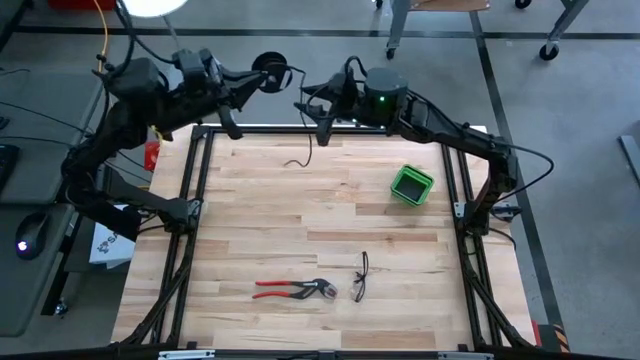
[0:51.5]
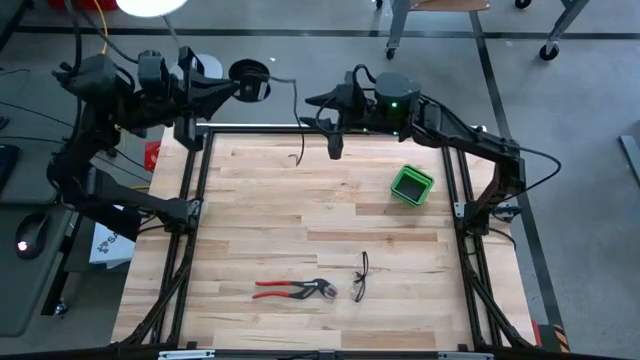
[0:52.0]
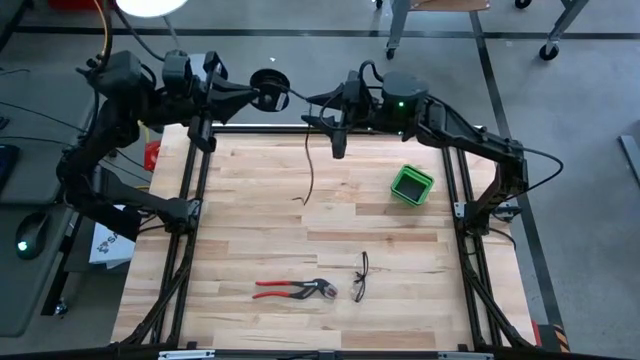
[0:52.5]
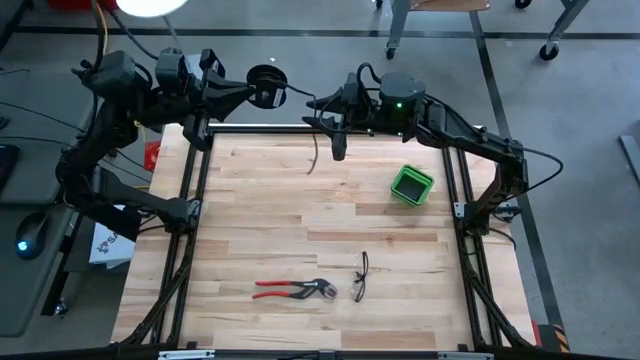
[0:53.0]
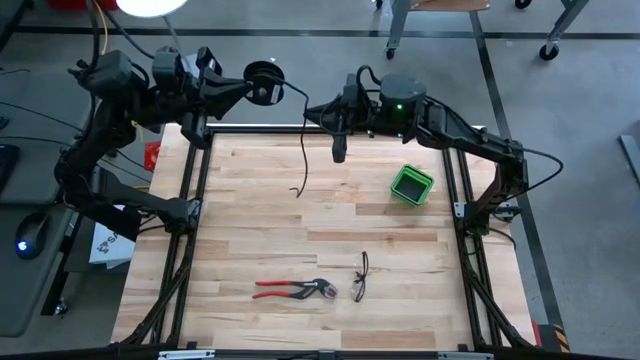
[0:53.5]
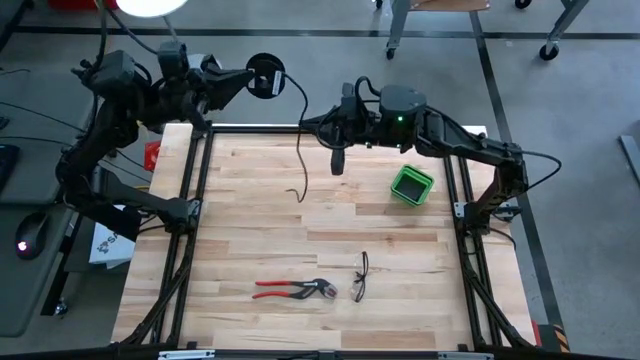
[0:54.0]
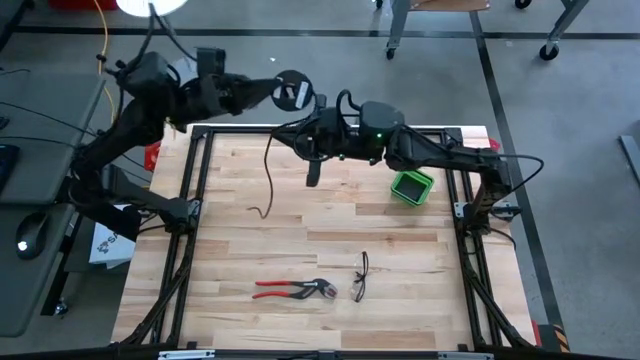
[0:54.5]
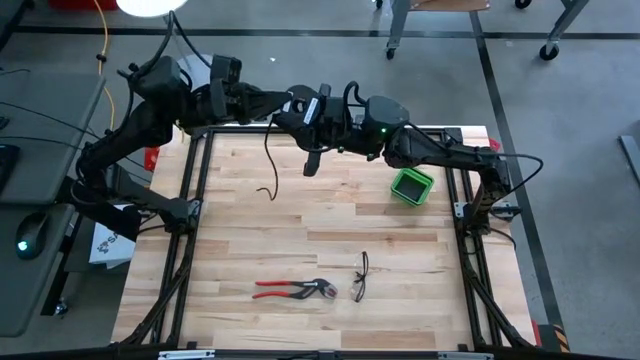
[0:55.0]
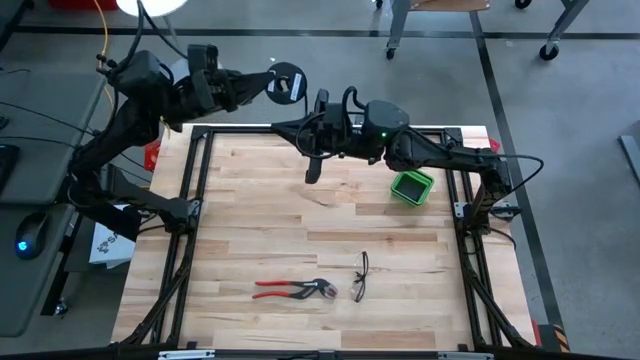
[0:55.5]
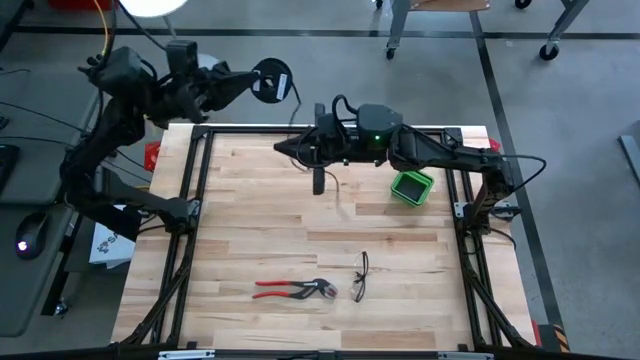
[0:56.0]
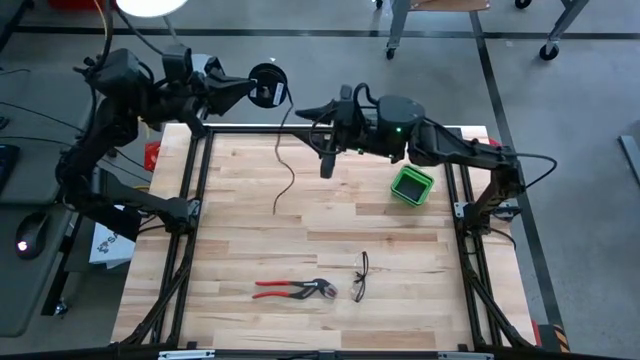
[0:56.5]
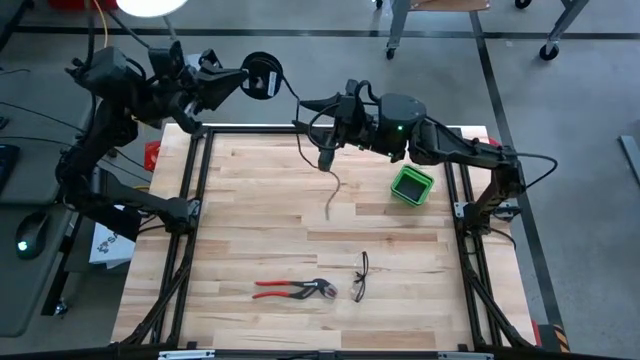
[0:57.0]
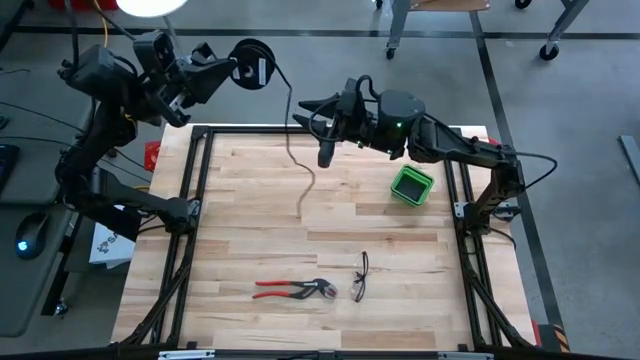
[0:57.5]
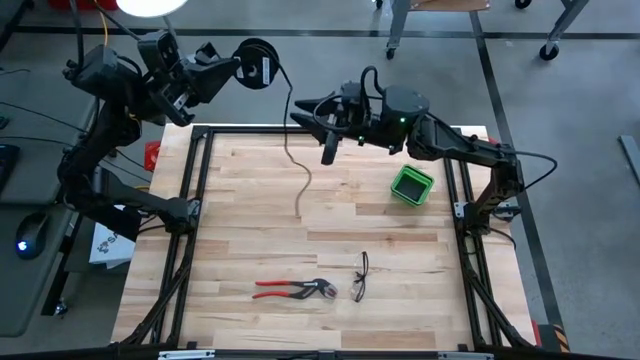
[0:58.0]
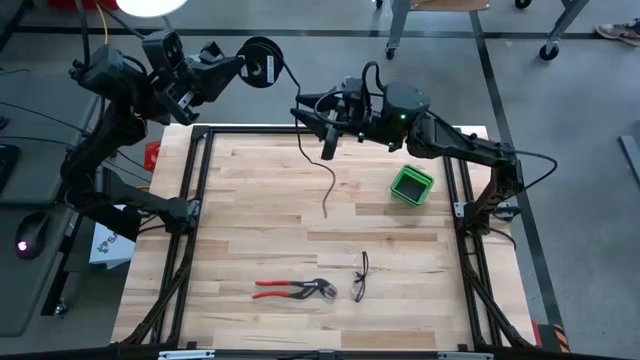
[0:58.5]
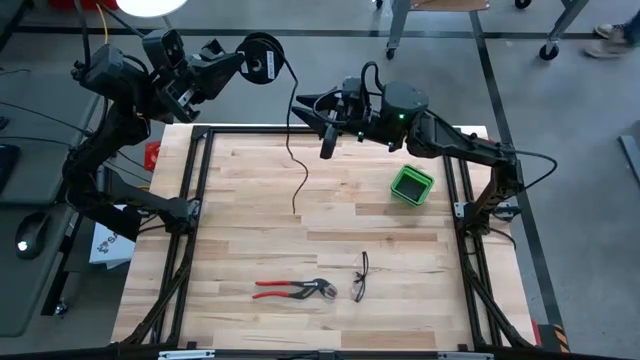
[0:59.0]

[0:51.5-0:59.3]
Task: Coil cords
Coil the black wire on the black spool

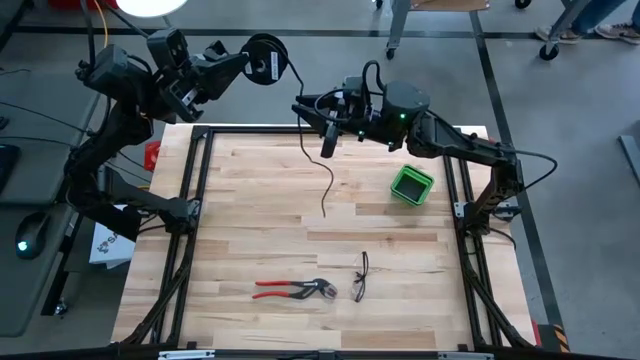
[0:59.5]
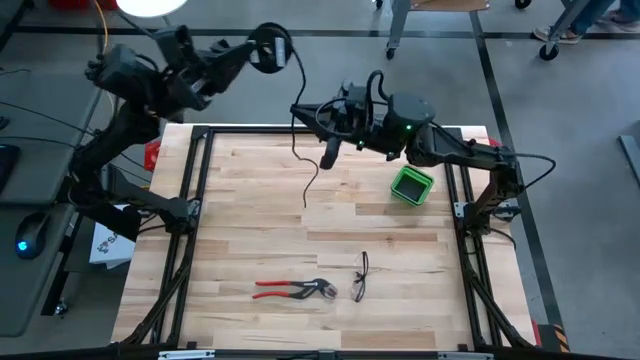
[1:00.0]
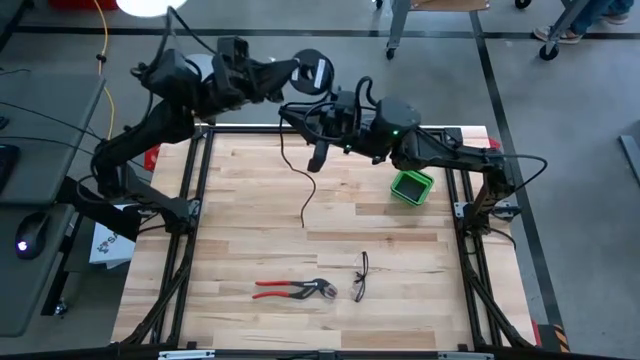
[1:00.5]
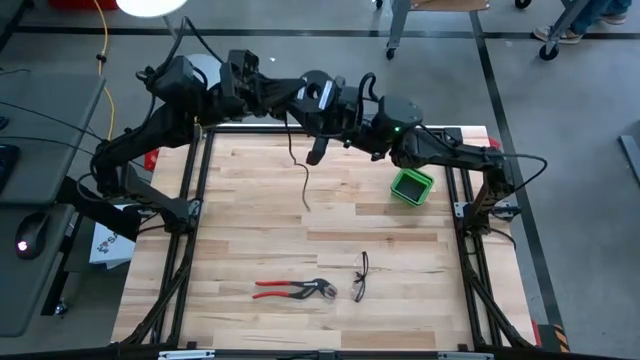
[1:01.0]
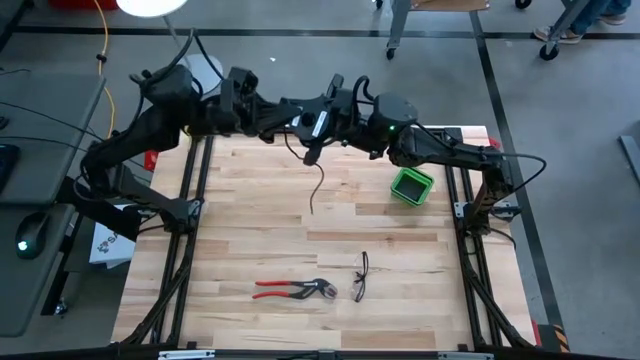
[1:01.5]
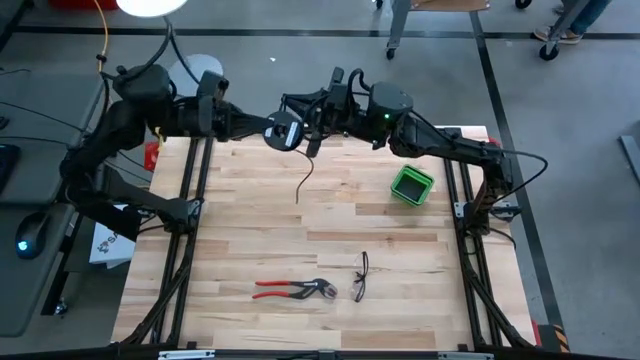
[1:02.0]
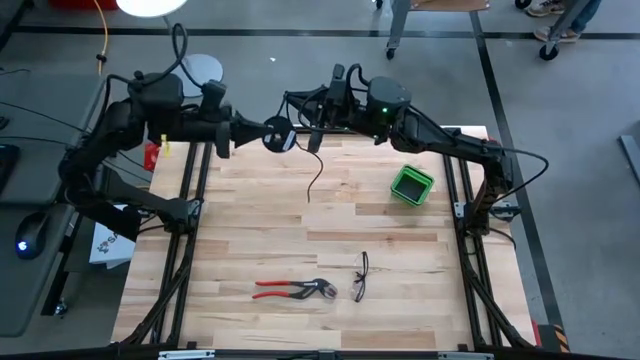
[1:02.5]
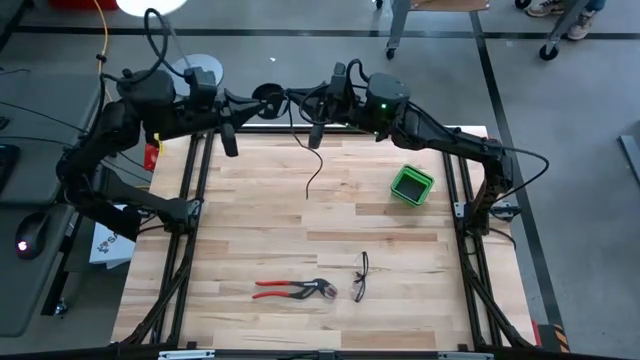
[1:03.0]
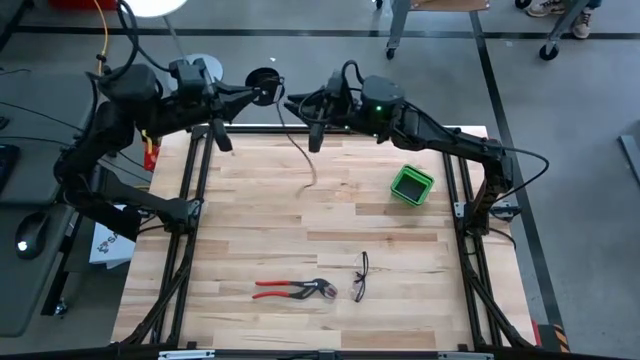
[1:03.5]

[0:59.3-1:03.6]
Coil the black wire on the black spool

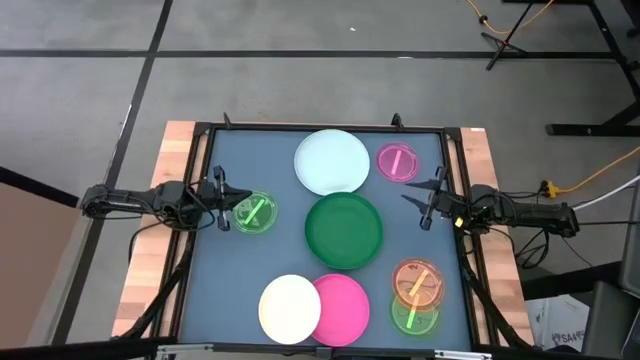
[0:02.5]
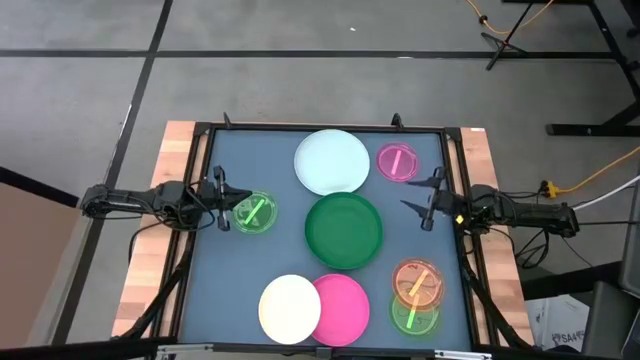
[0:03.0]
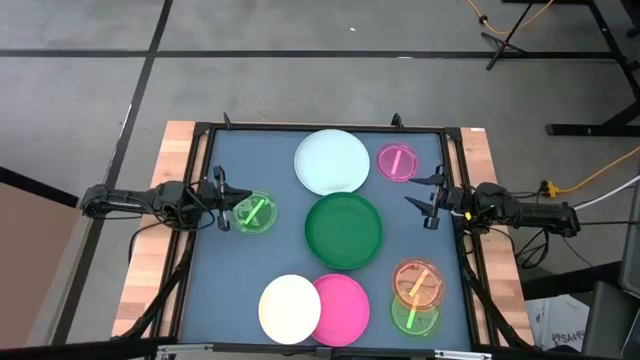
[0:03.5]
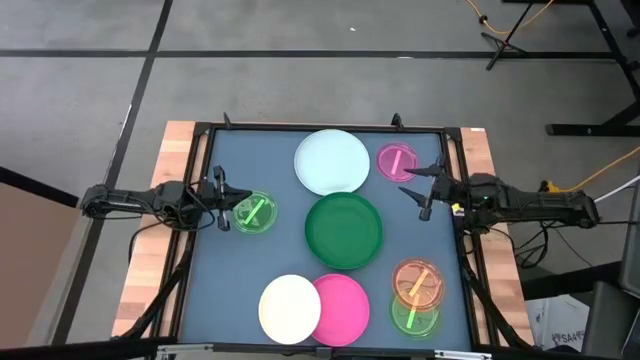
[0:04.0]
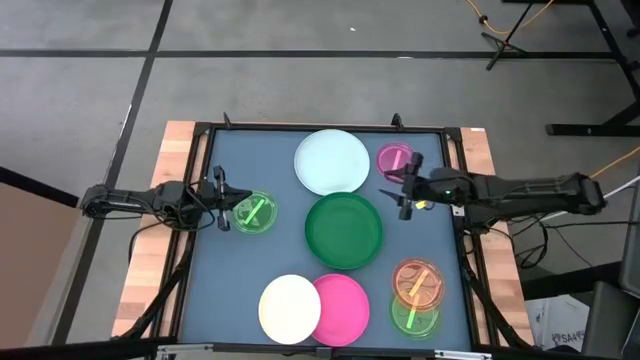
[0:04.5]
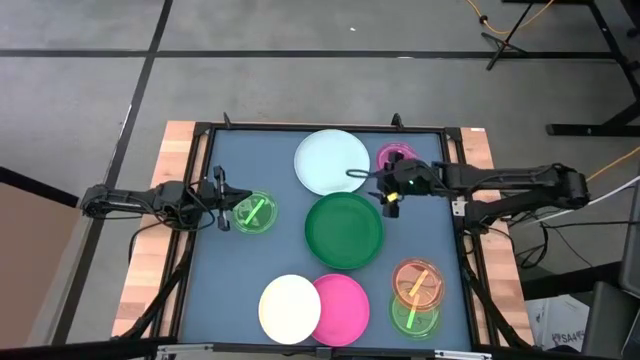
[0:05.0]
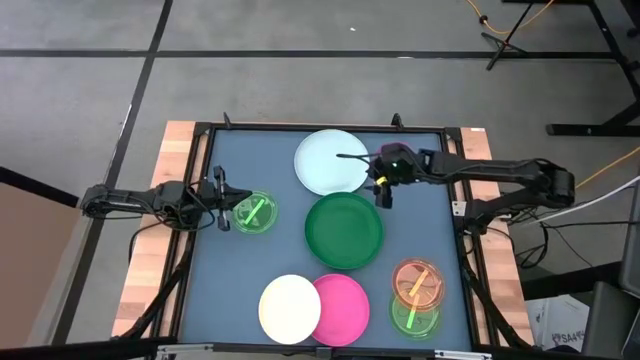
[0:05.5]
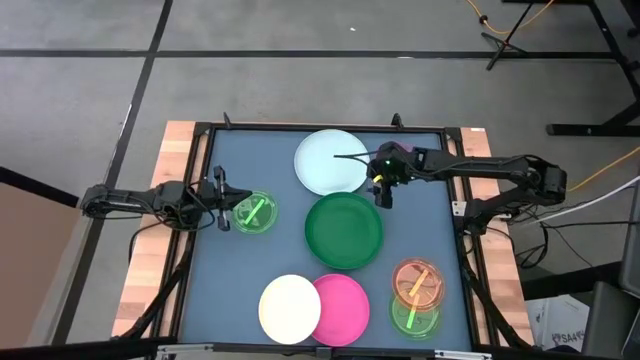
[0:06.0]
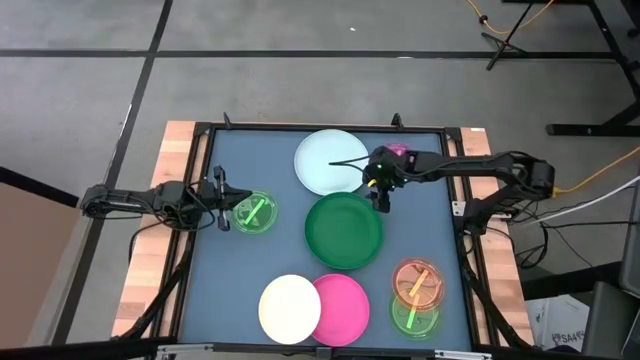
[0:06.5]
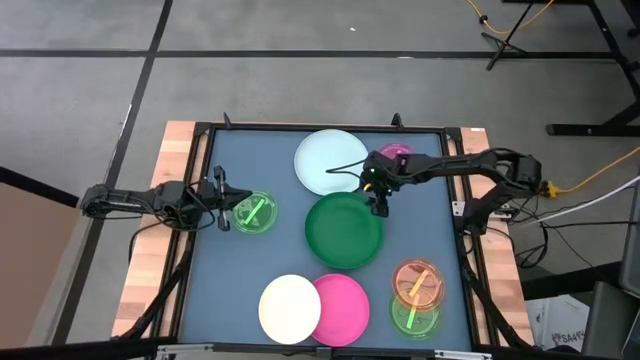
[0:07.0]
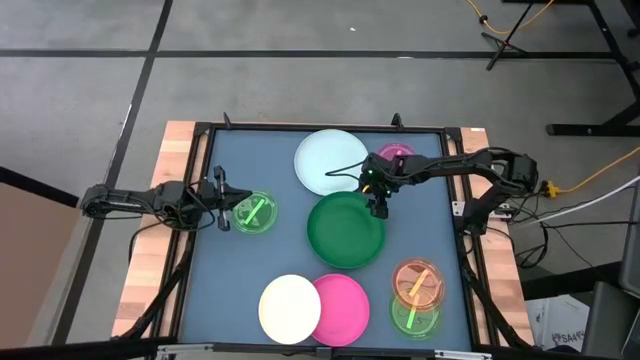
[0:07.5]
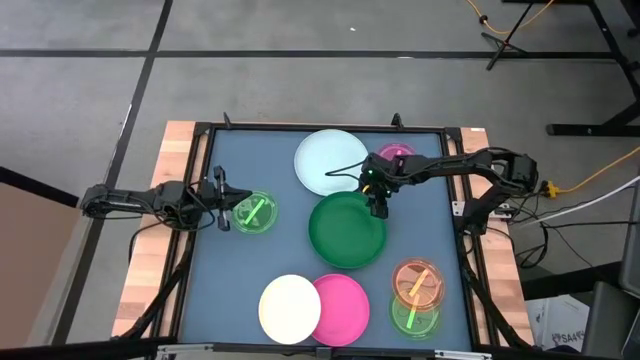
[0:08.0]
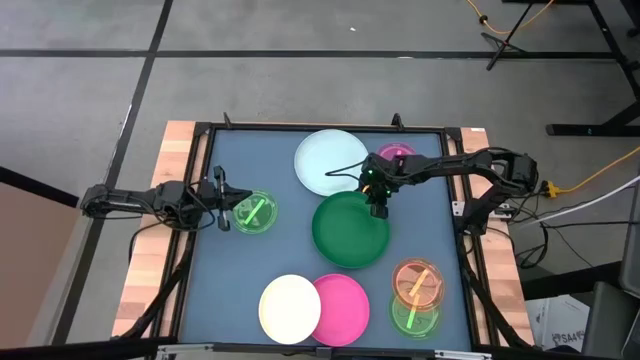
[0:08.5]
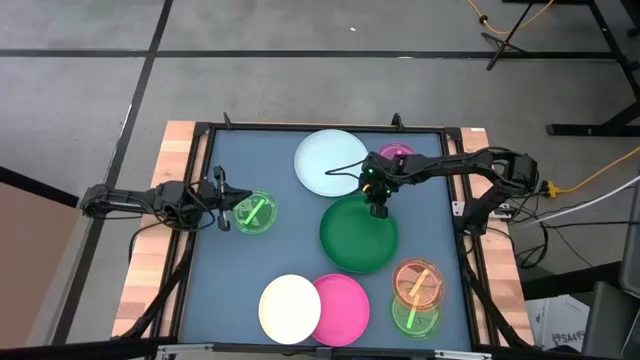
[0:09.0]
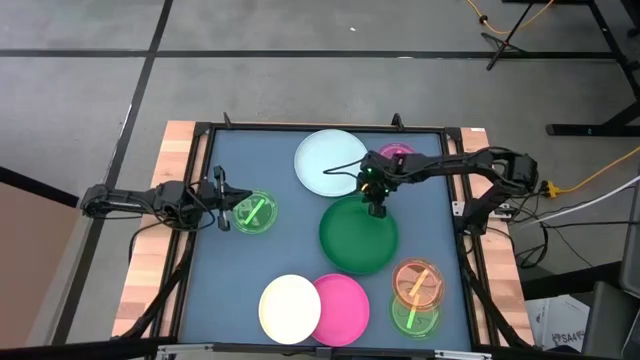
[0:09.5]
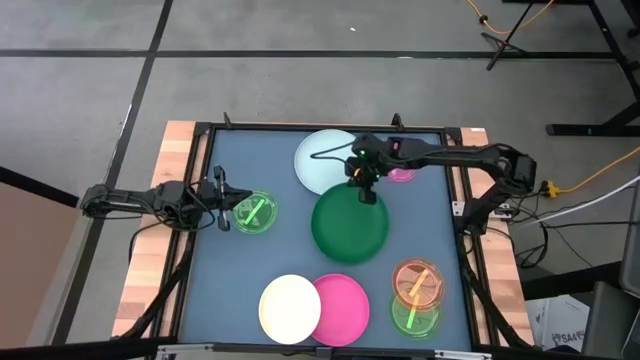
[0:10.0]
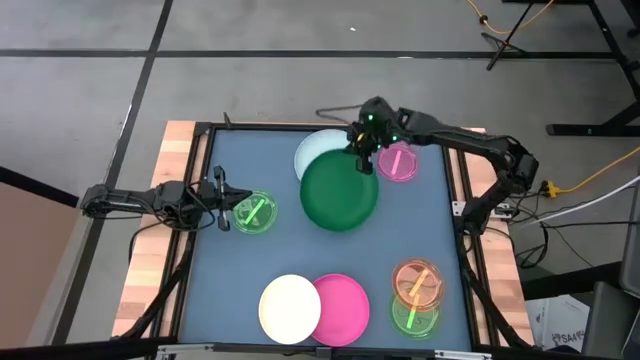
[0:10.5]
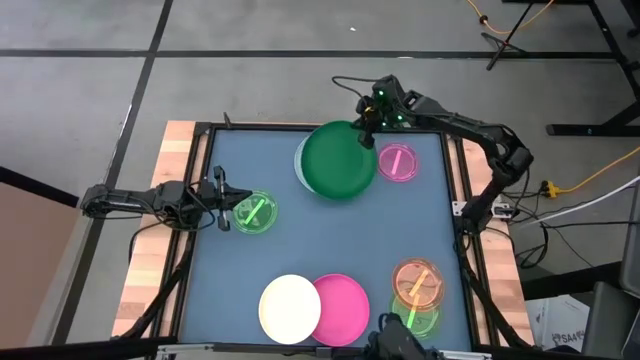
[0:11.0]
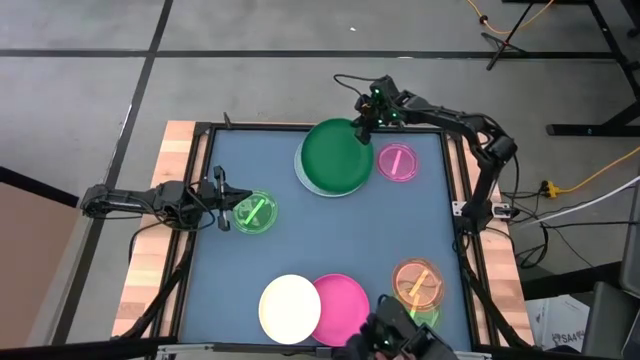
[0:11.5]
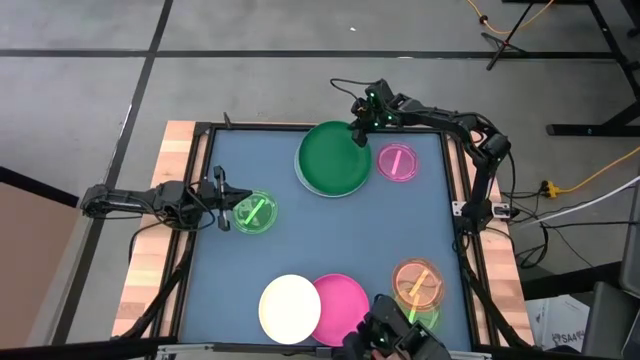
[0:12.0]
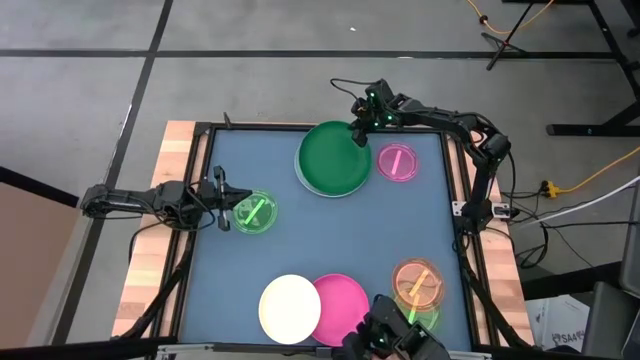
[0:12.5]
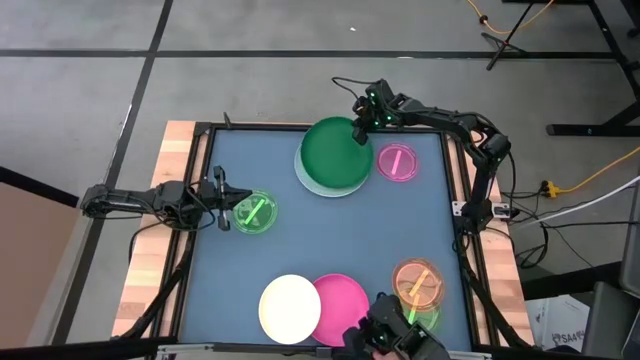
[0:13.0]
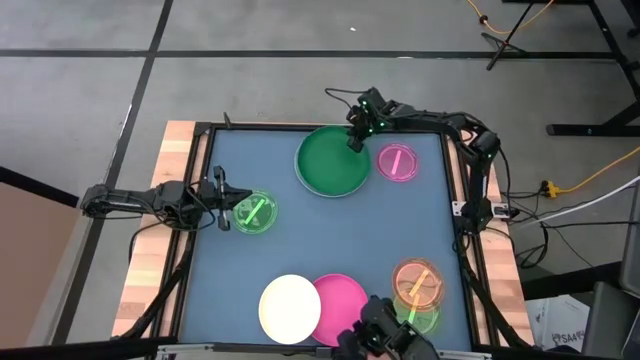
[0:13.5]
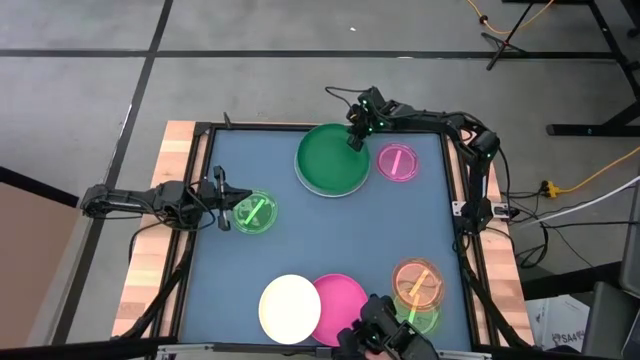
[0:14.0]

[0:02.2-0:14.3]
Task: Stack plastic plates
Stack the green plate on top of the light blue plate
